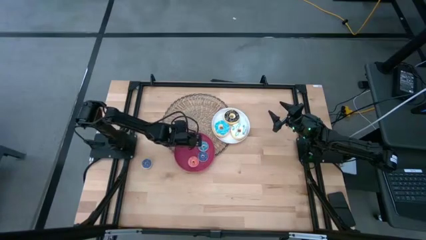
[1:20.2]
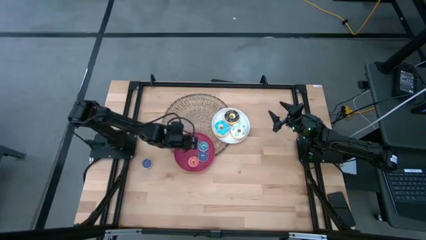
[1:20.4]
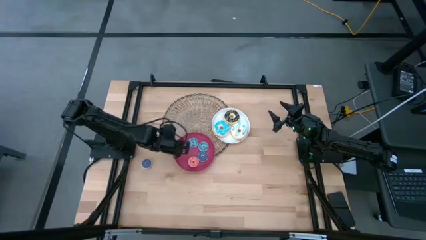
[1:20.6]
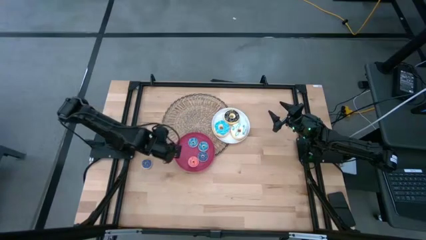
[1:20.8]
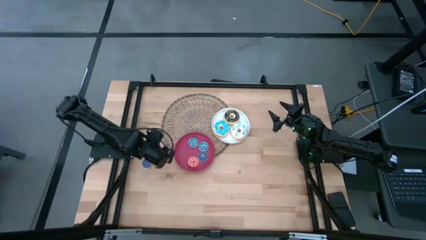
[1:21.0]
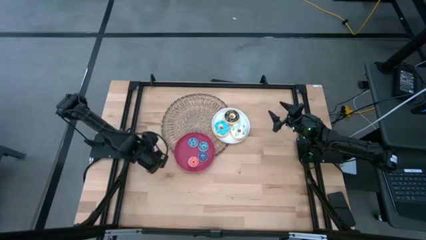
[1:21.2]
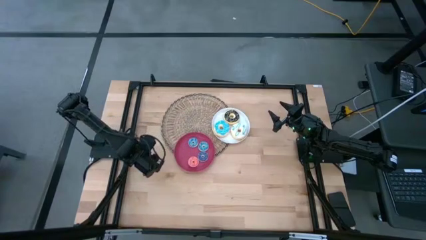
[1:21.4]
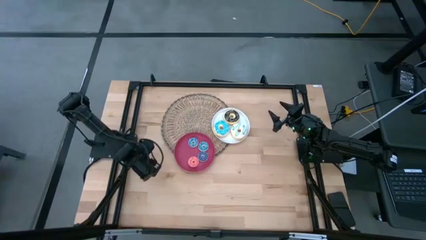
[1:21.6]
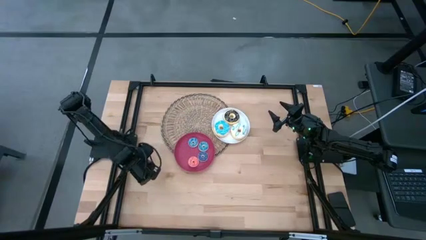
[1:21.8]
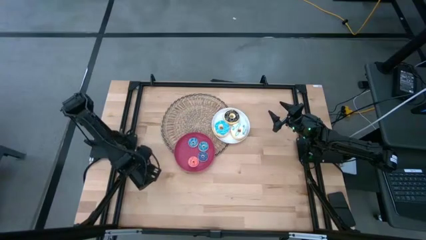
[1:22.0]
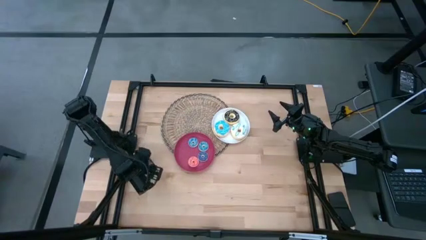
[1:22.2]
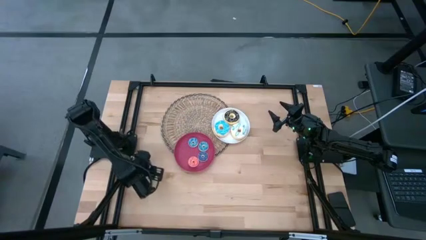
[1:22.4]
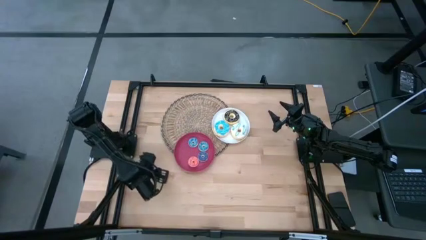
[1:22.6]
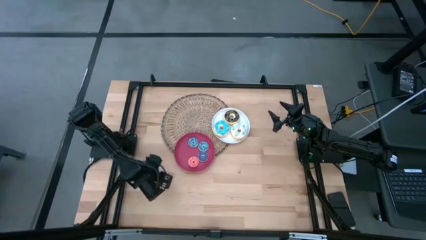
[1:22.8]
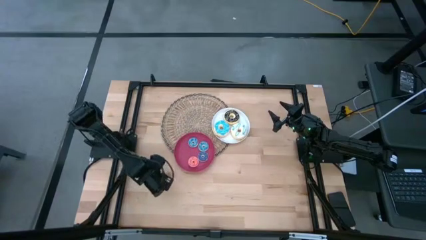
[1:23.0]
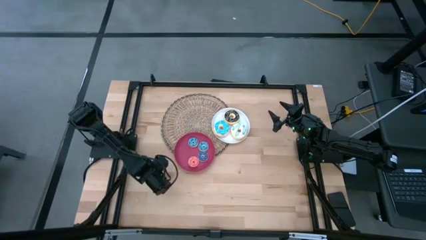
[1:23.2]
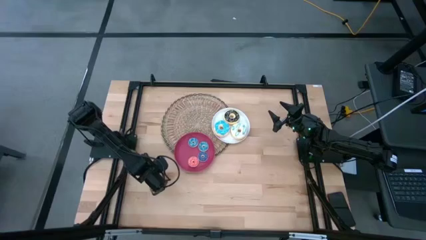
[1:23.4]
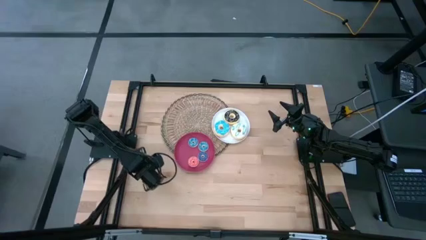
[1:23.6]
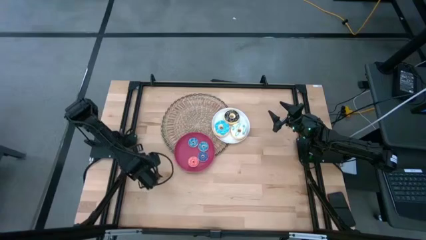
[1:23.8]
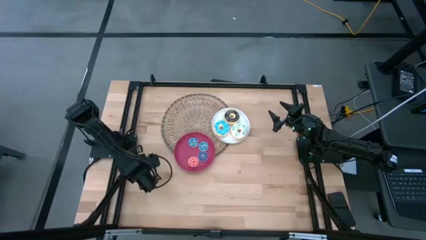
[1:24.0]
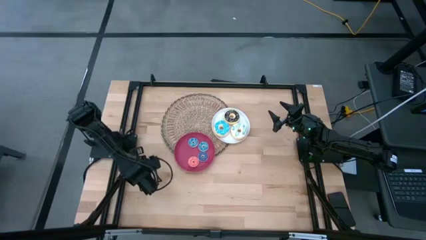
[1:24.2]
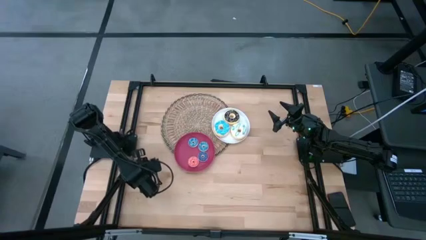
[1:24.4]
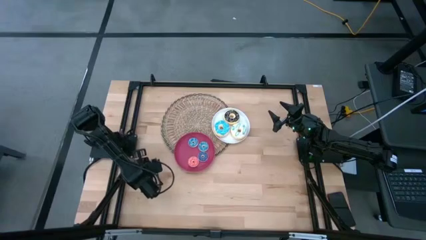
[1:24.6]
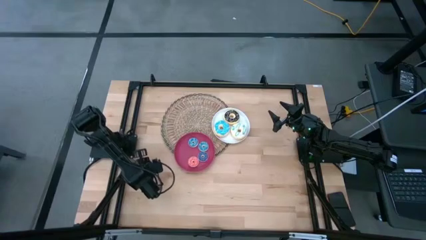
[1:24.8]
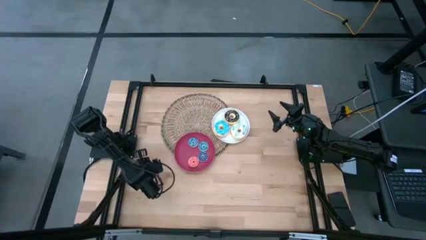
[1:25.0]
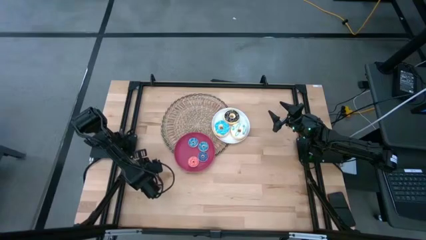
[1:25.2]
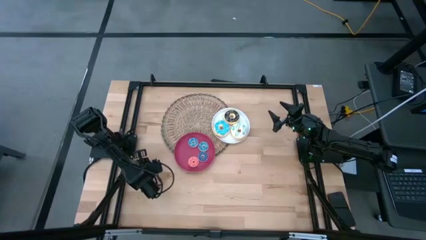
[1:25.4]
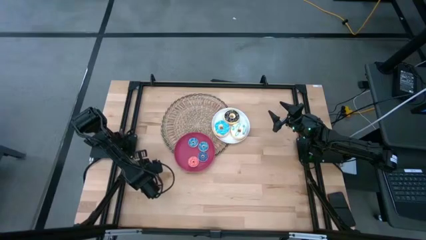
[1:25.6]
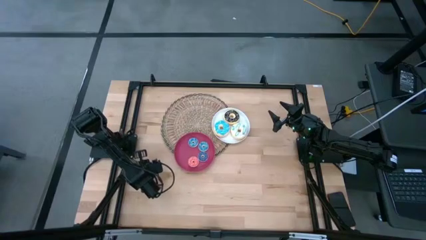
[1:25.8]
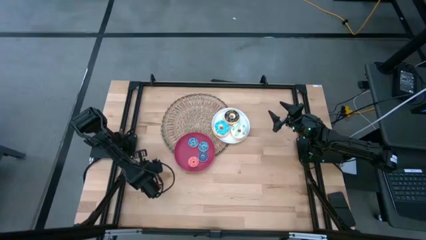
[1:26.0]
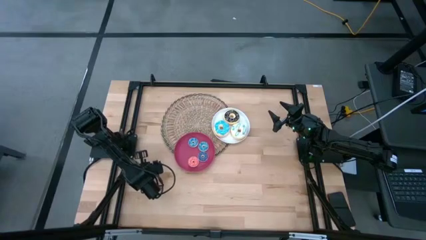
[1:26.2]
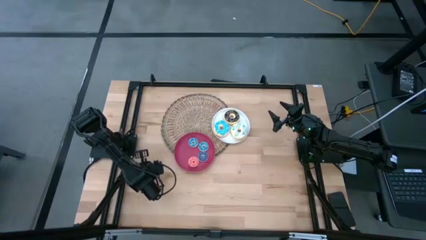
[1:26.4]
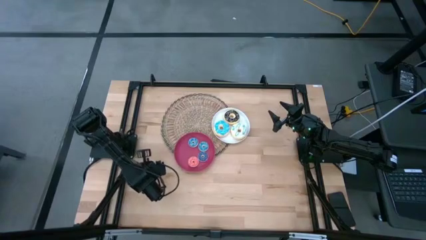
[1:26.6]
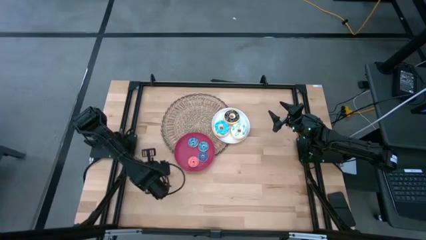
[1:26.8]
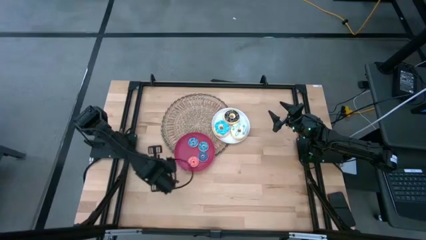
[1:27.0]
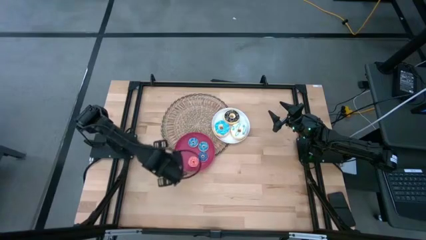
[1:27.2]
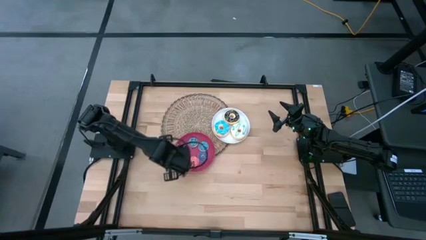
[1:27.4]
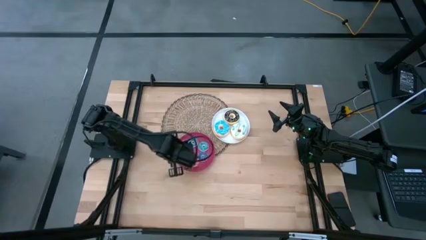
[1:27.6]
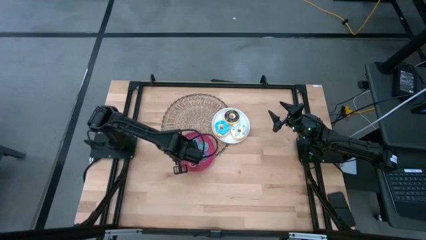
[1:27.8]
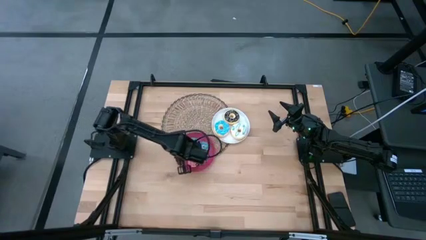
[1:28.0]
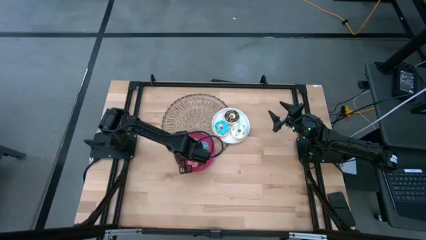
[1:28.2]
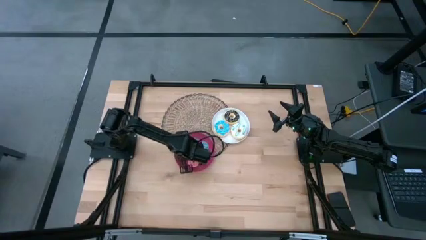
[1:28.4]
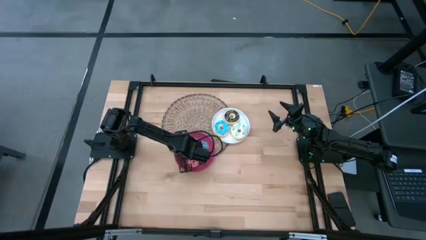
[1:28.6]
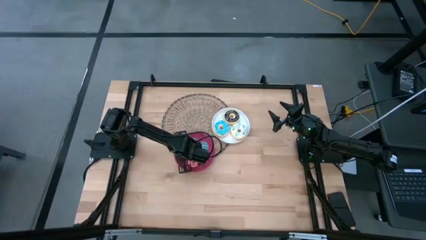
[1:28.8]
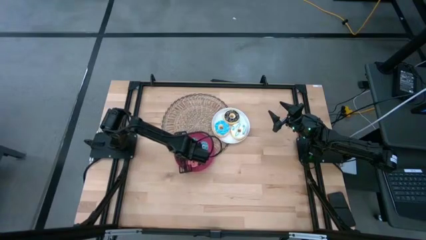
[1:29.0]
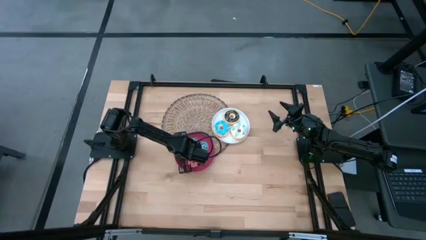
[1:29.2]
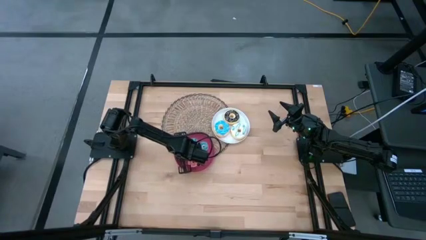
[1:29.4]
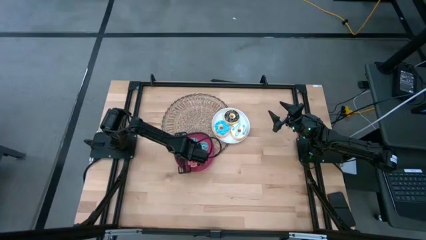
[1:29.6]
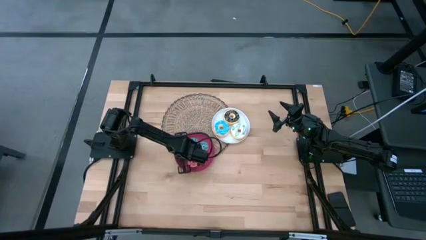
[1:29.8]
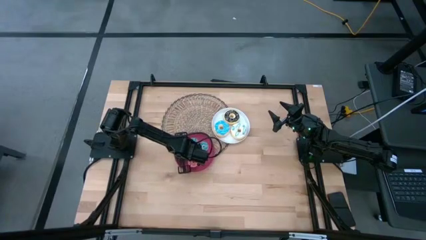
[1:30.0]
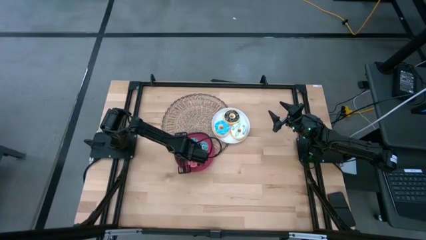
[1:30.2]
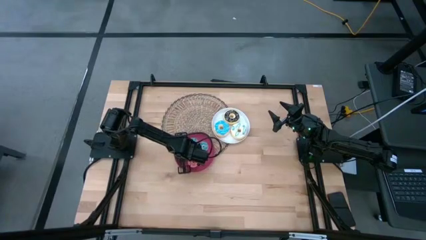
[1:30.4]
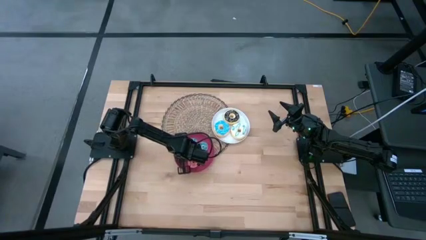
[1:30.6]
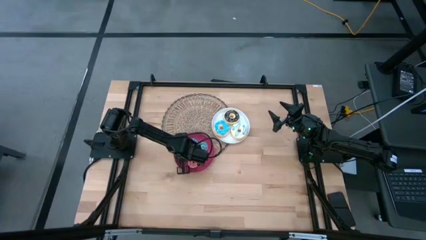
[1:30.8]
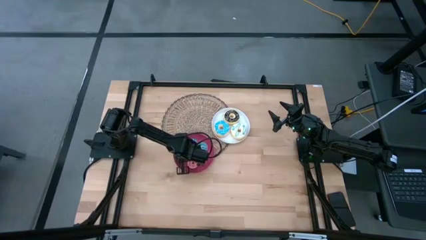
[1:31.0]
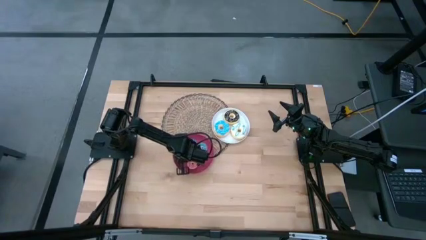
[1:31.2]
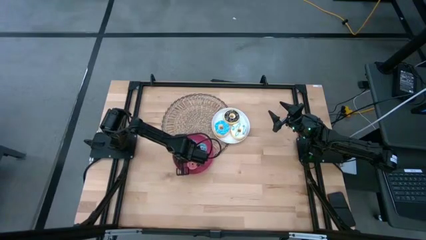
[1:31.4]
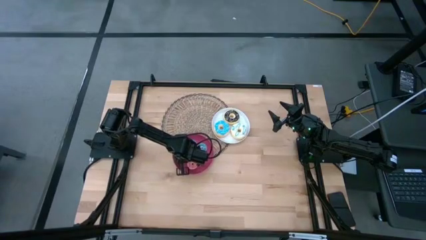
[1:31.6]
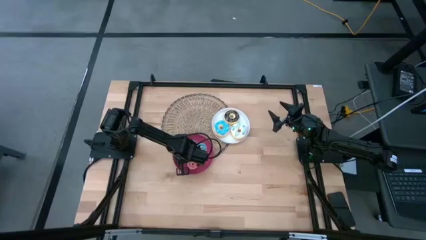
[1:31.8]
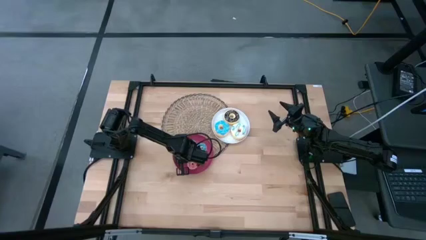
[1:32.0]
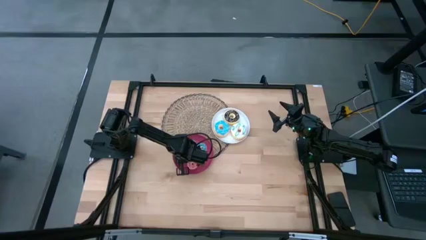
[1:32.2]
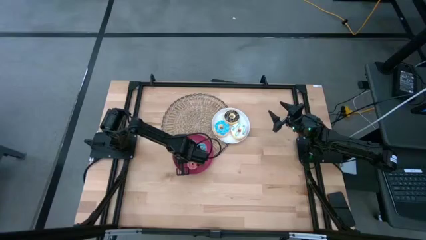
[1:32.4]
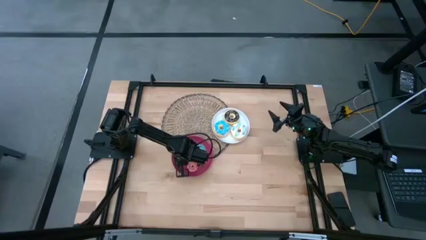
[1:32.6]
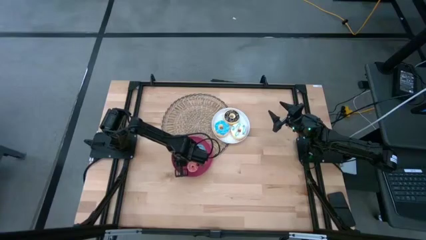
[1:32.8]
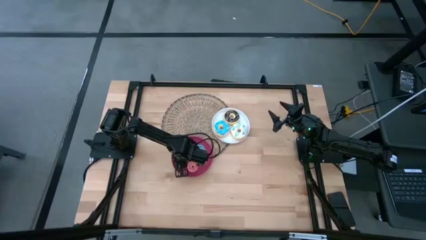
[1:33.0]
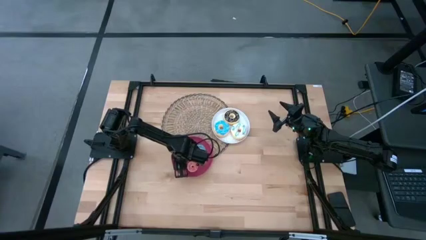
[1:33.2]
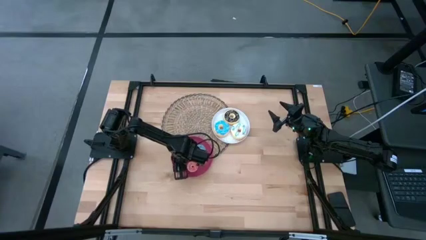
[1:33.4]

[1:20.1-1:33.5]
Task: Pick & Place donuts
Put the blue donut on the pink plate
